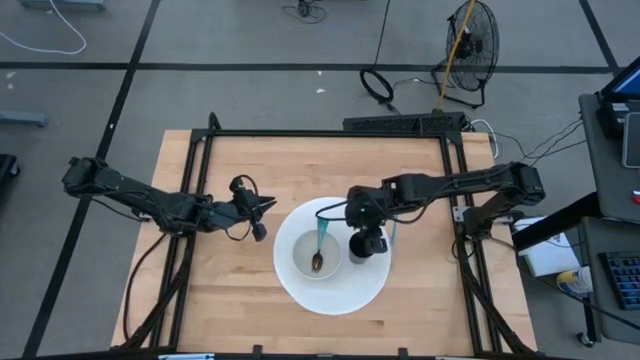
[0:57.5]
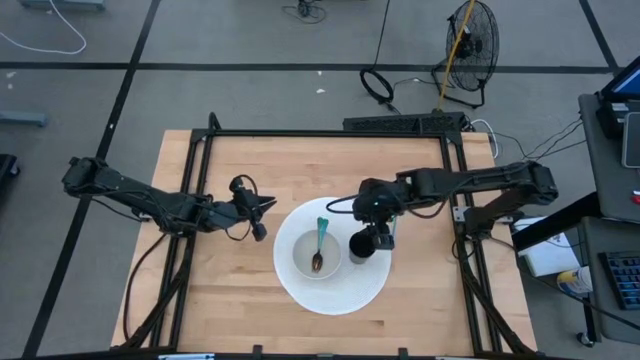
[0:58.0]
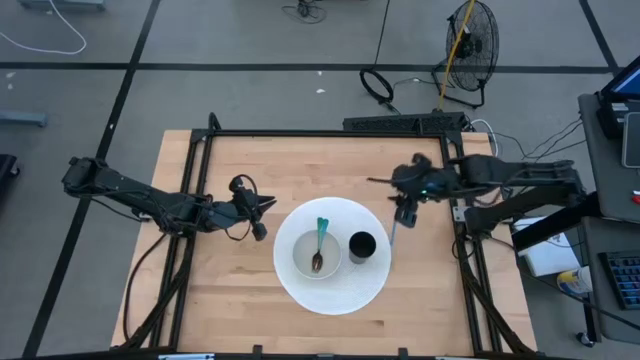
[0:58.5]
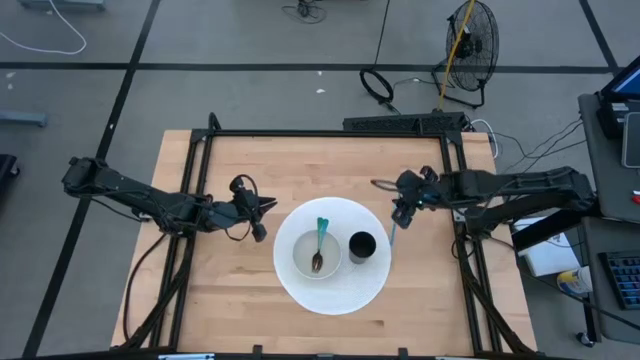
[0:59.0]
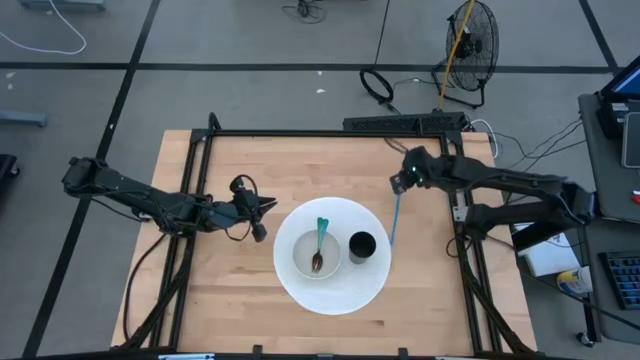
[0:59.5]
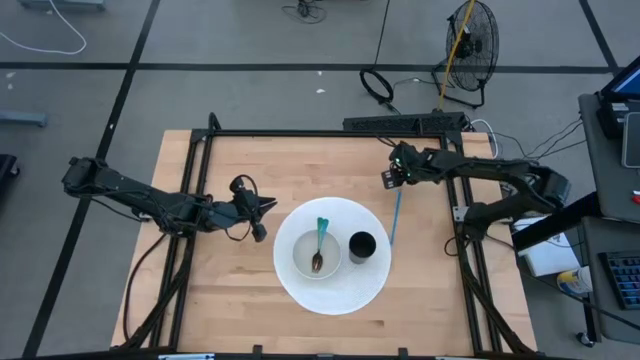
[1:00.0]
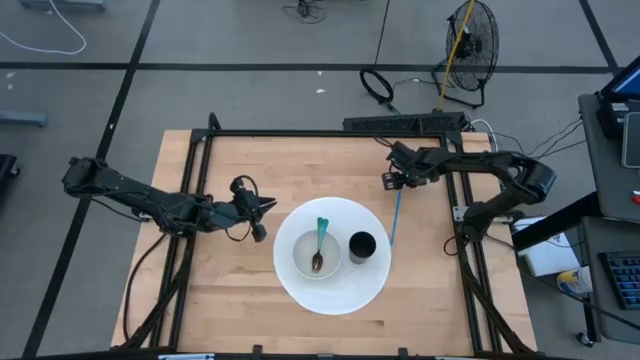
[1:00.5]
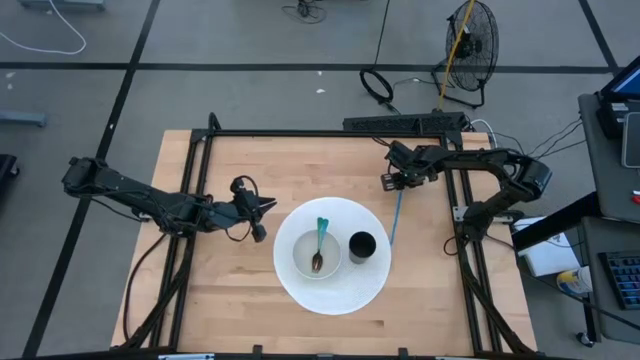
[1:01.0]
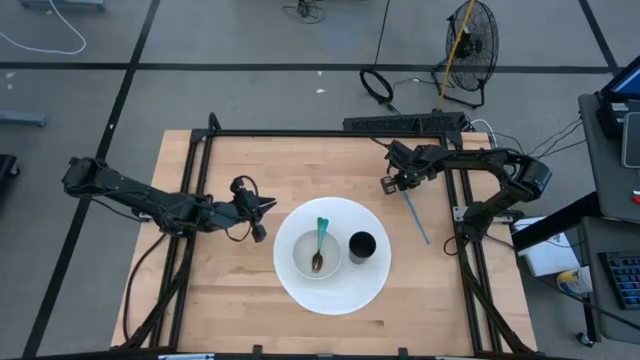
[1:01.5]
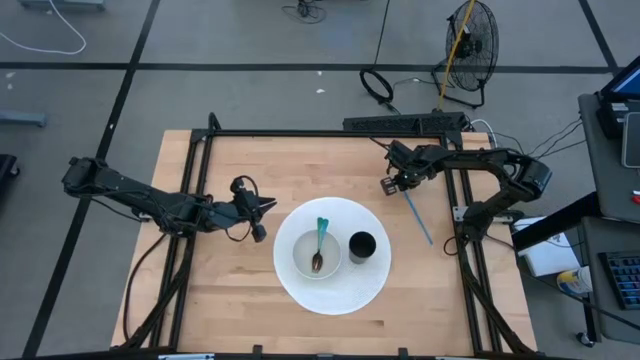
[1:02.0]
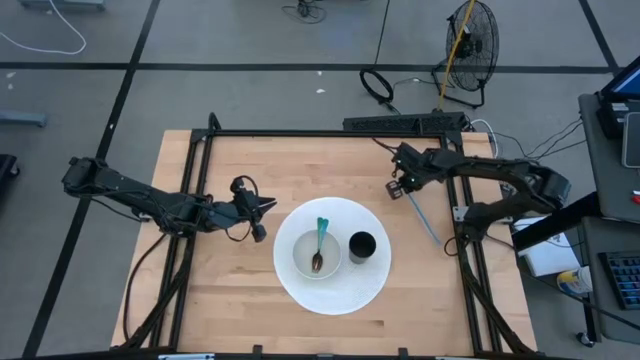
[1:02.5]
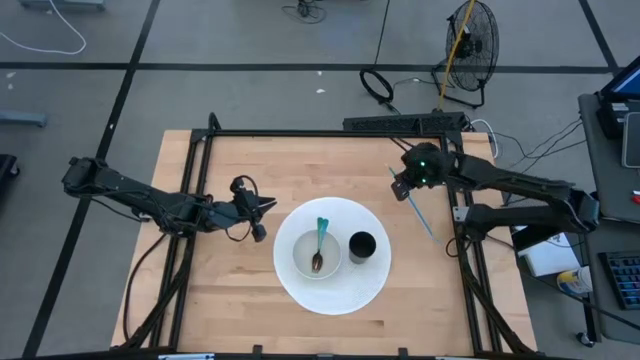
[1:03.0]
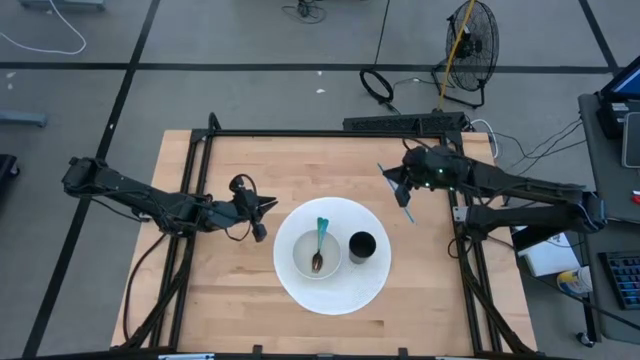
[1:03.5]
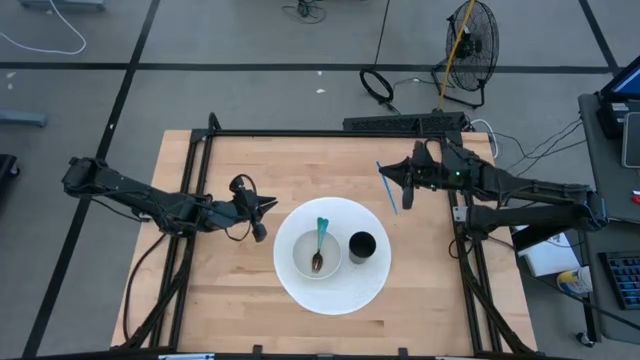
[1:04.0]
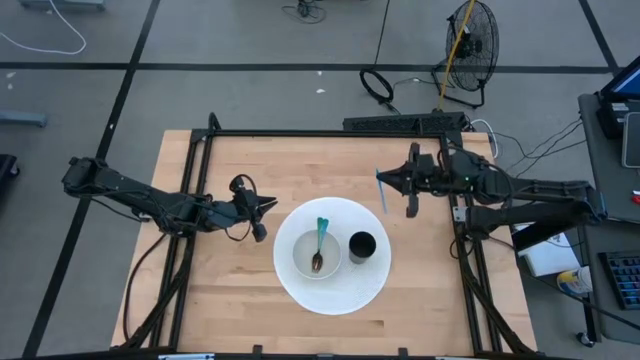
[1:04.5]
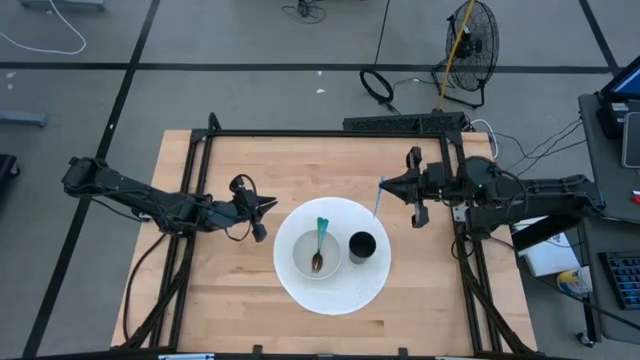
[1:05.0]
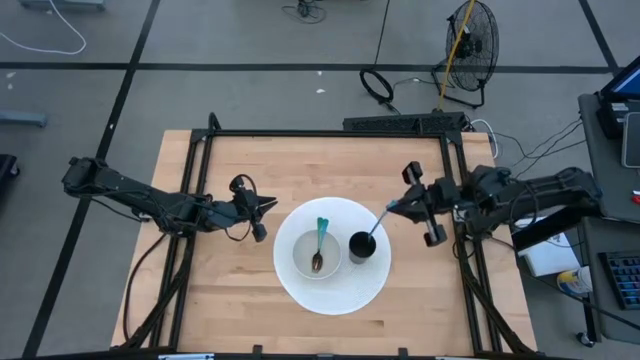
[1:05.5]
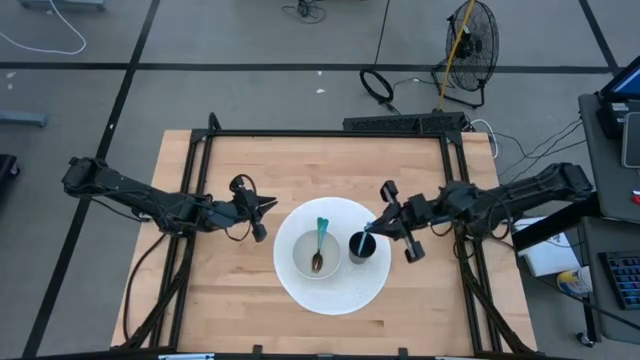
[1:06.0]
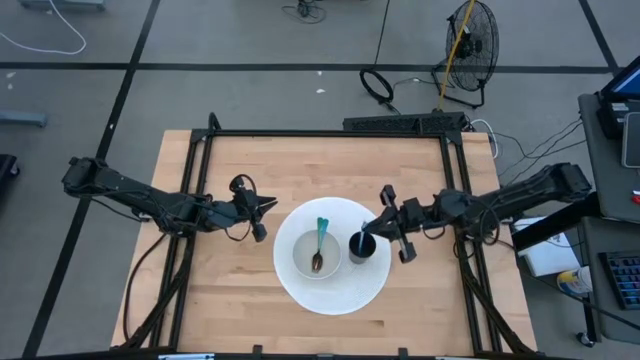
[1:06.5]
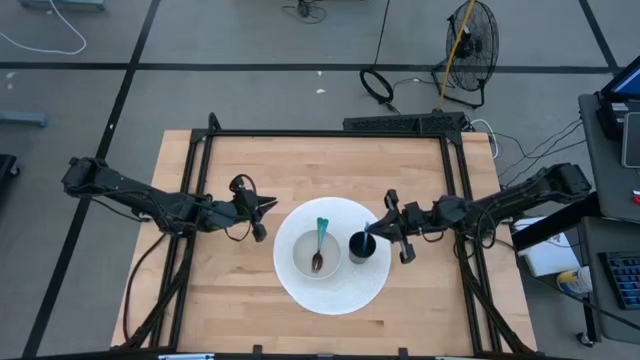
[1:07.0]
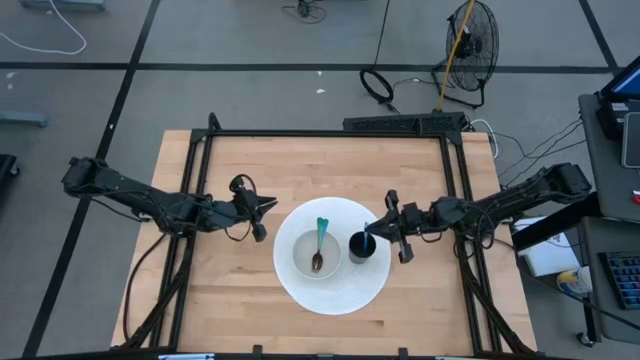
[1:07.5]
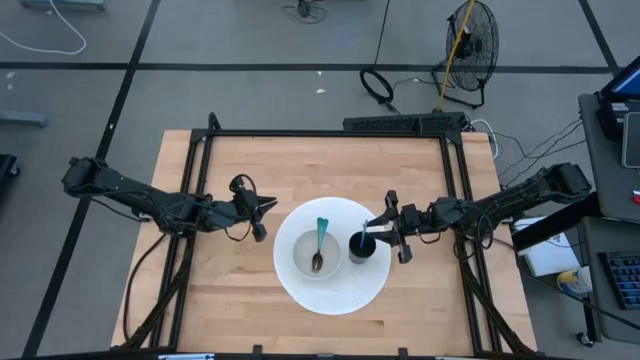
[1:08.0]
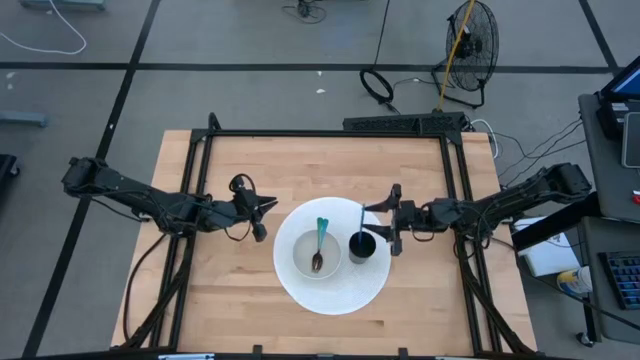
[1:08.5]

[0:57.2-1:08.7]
Task: Pick & Place Utensil
Put the blue straw into the black cup on the white mat

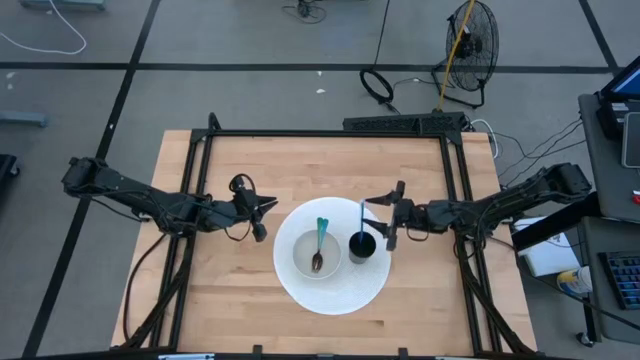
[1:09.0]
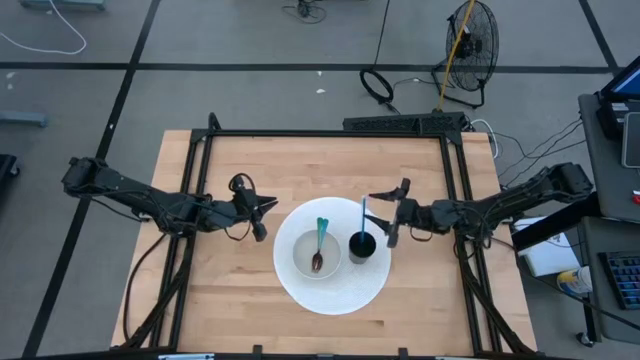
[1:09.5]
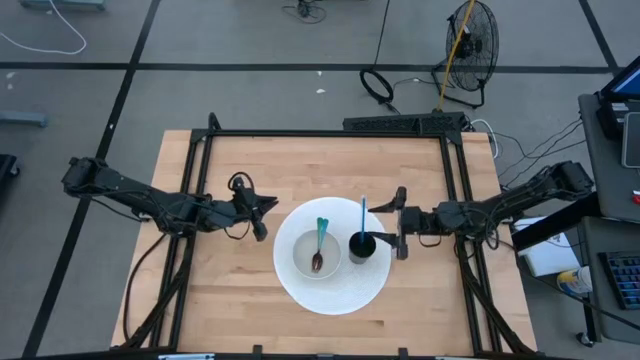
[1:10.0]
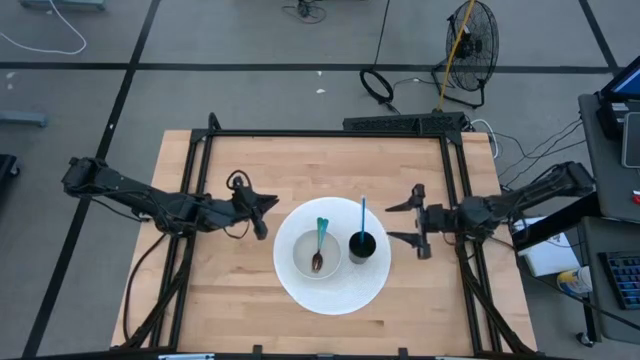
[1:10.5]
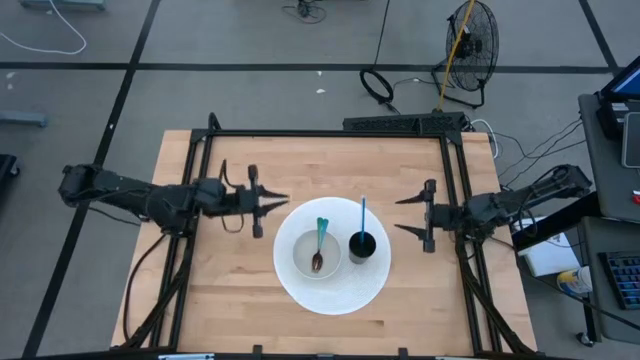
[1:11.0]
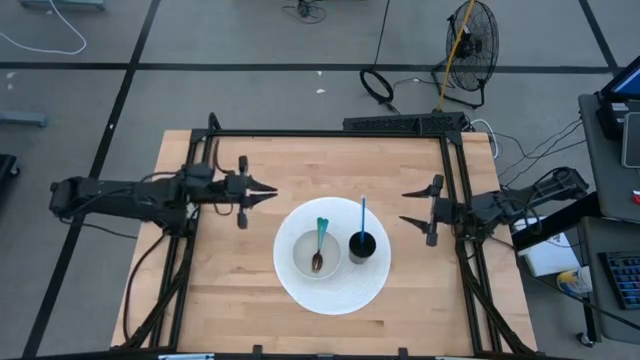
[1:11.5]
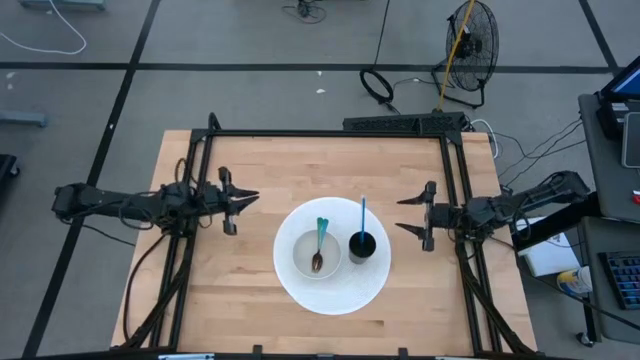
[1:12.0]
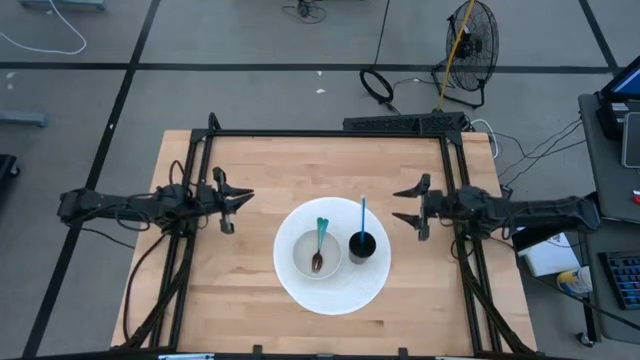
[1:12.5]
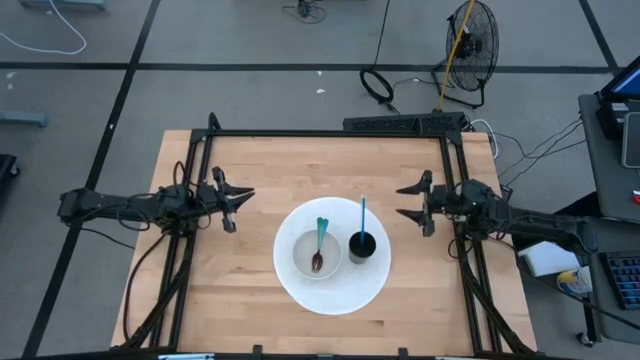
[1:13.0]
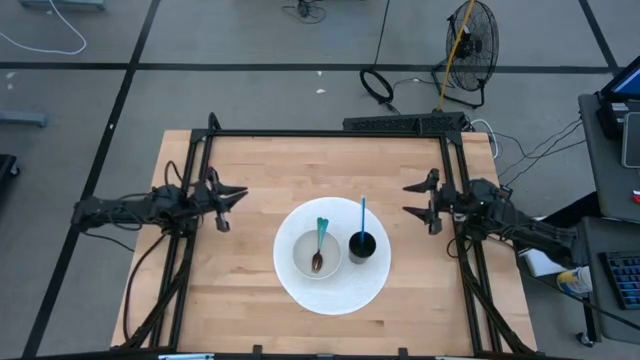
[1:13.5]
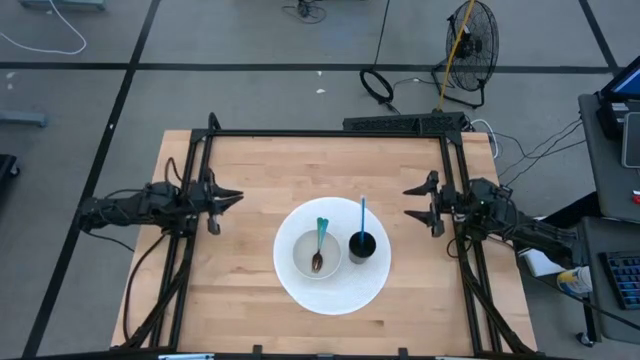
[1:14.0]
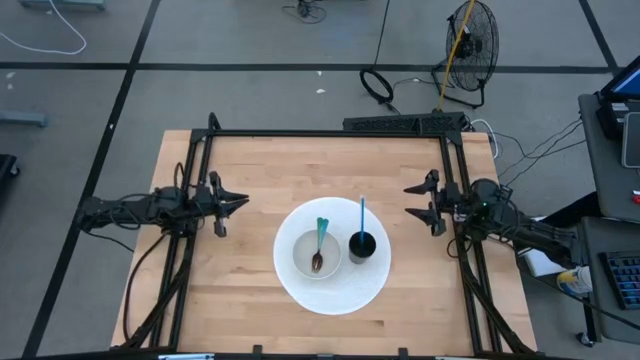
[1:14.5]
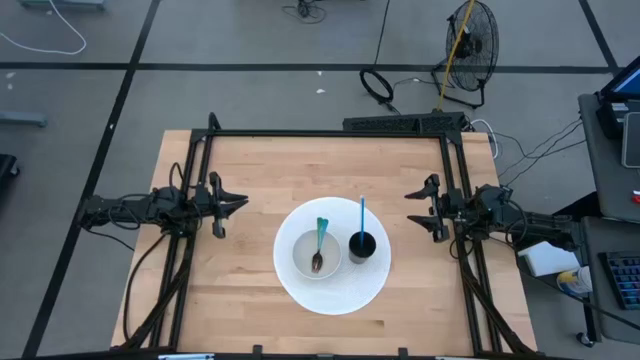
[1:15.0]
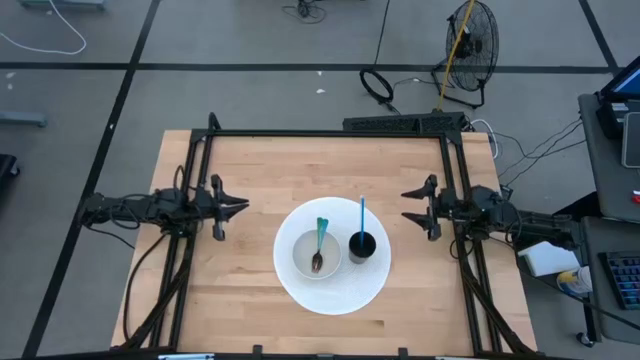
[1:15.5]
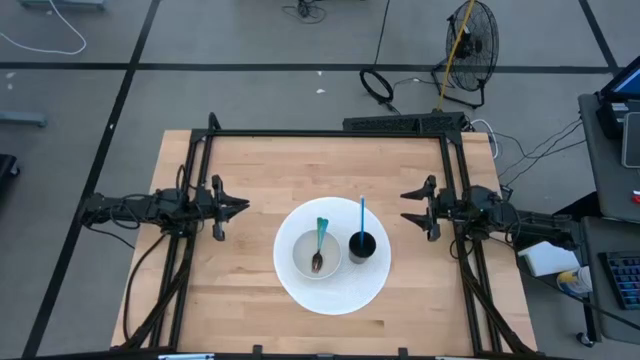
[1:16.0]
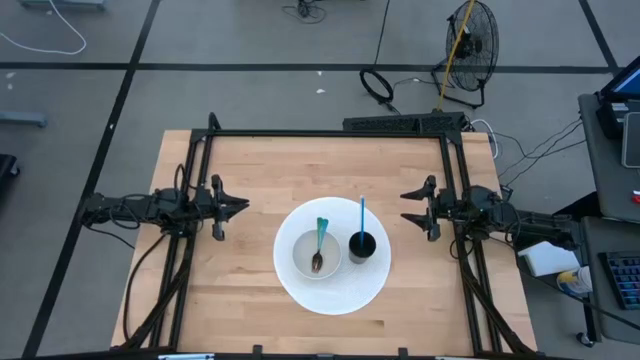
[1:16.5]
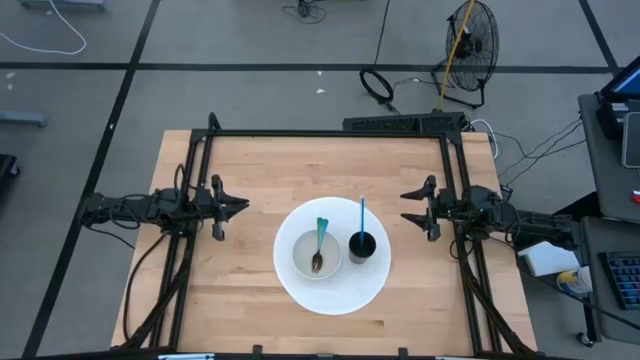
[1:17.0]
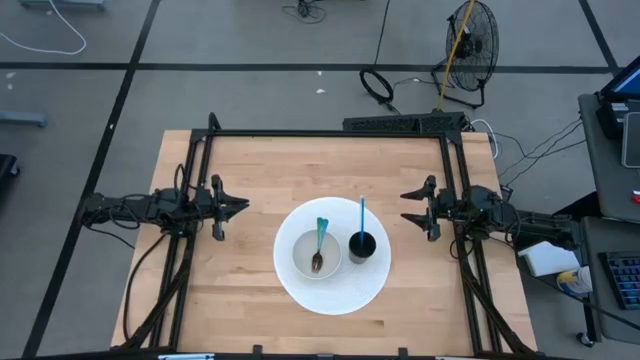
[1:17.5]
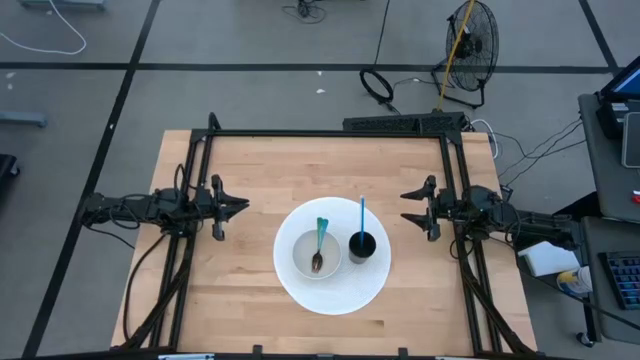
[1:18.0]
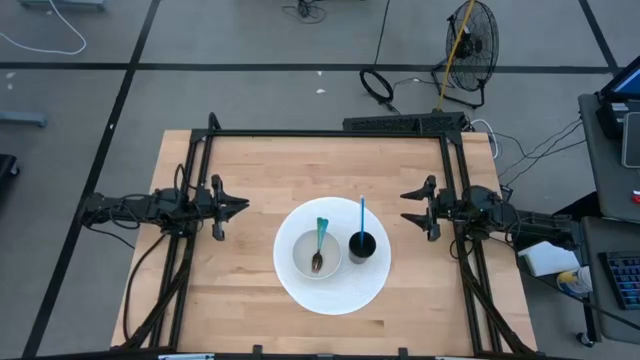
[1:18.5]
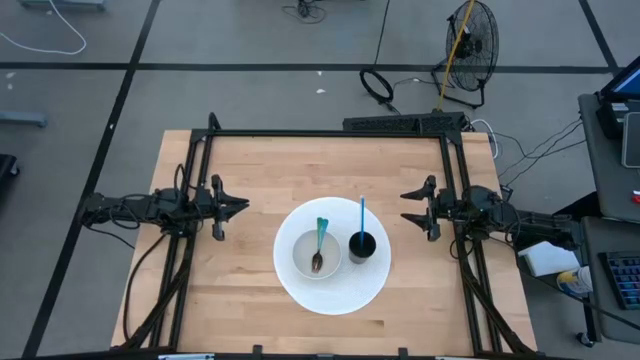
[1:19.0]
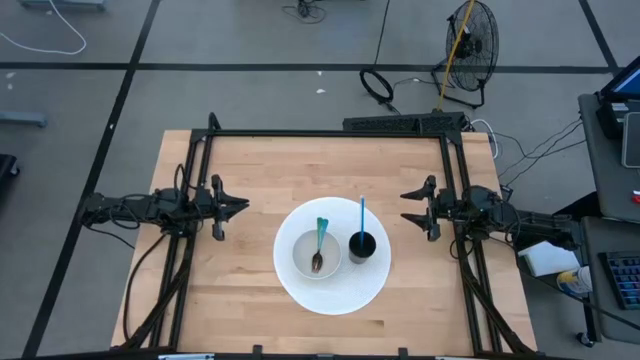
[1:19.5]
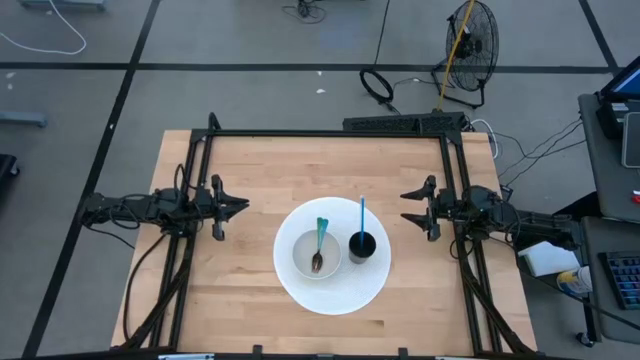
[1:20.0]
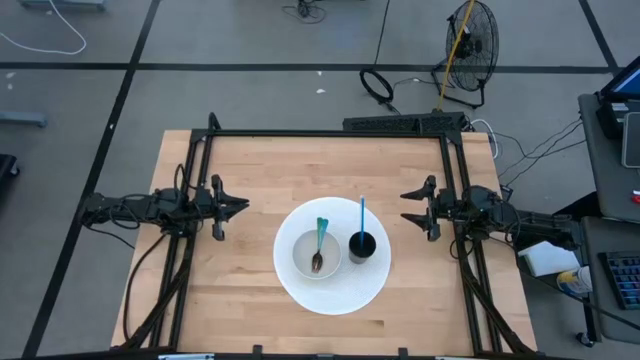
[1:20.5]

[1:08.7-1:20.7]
Return to Home Position
